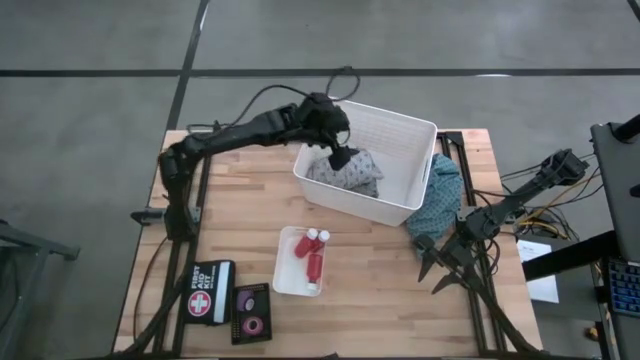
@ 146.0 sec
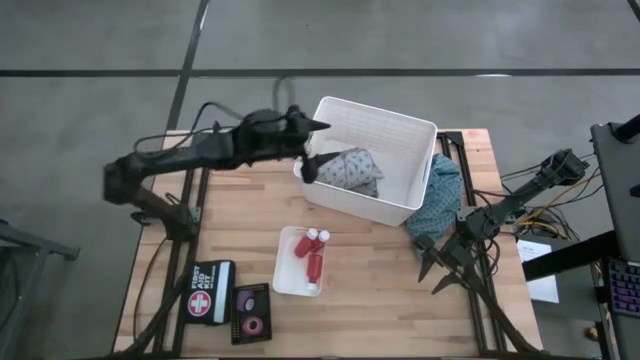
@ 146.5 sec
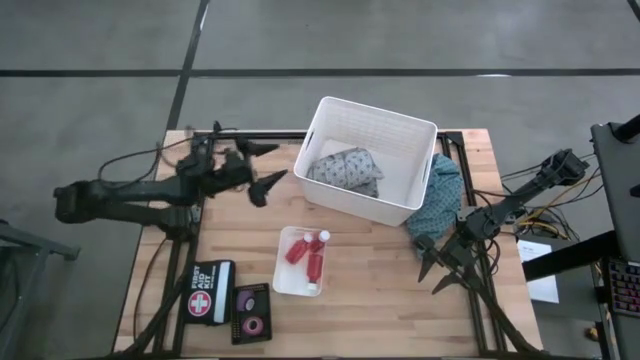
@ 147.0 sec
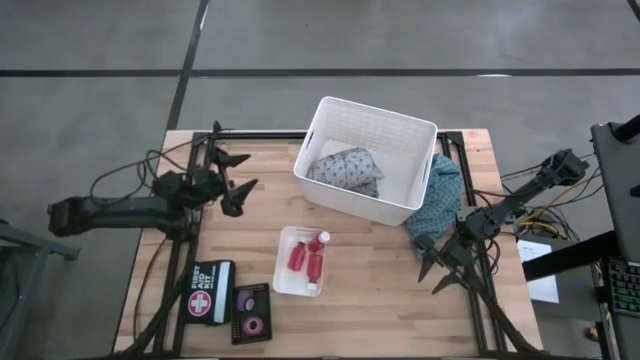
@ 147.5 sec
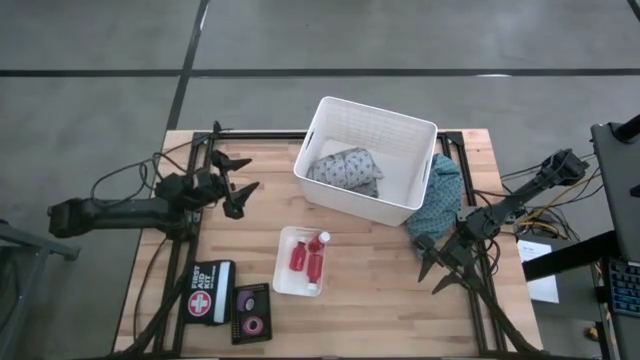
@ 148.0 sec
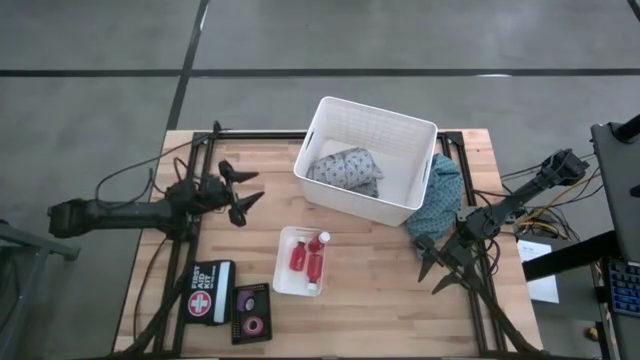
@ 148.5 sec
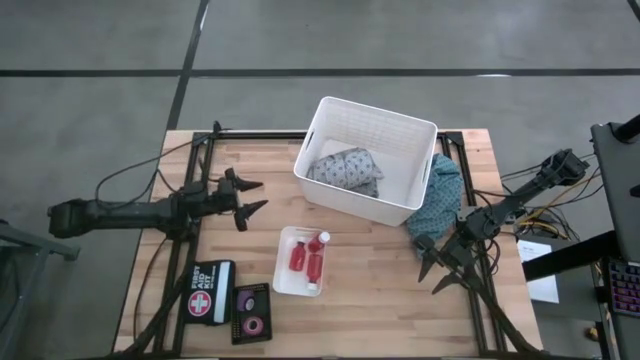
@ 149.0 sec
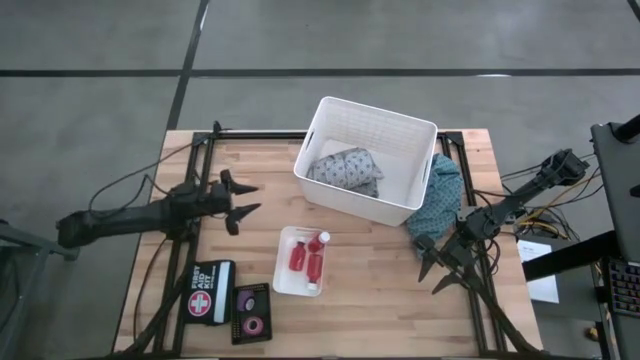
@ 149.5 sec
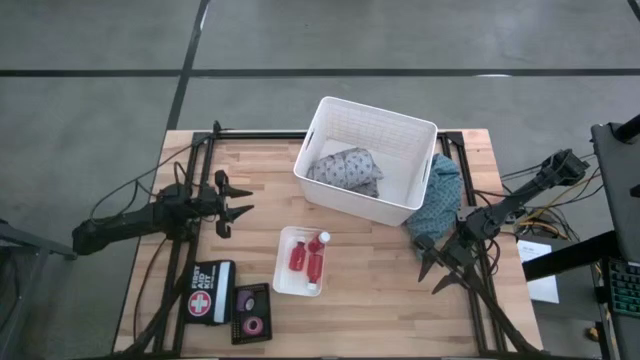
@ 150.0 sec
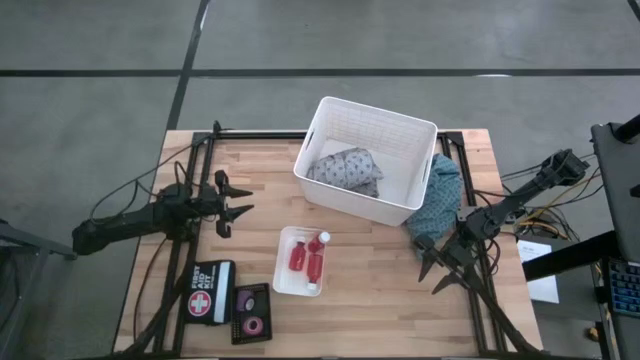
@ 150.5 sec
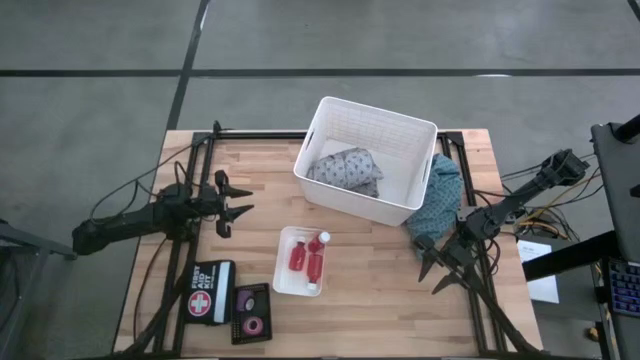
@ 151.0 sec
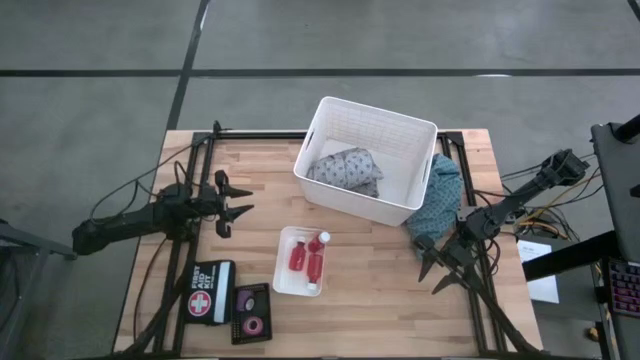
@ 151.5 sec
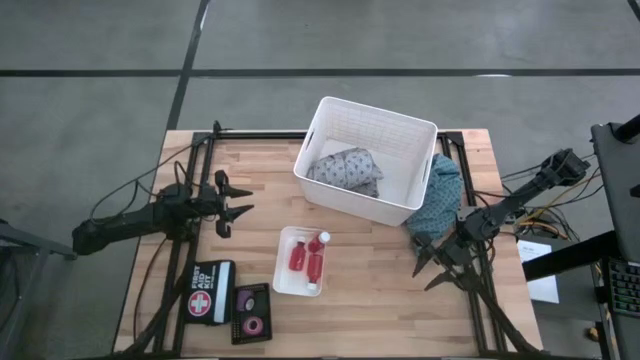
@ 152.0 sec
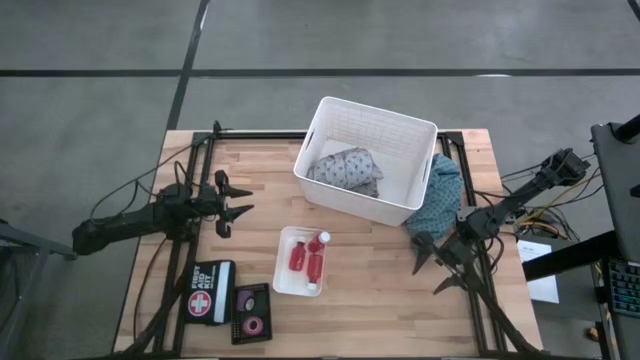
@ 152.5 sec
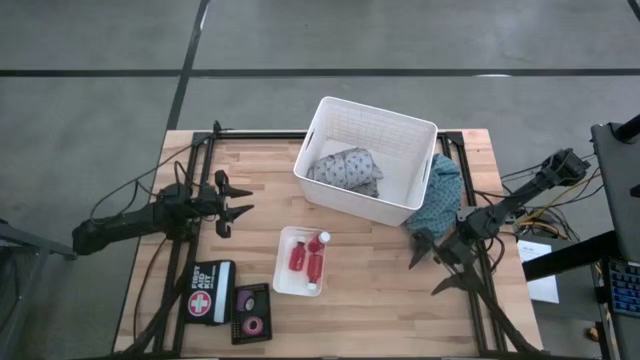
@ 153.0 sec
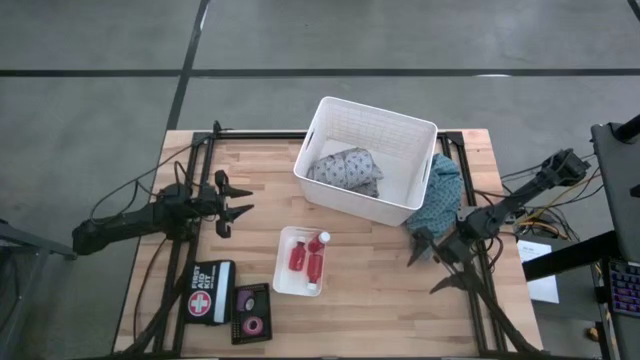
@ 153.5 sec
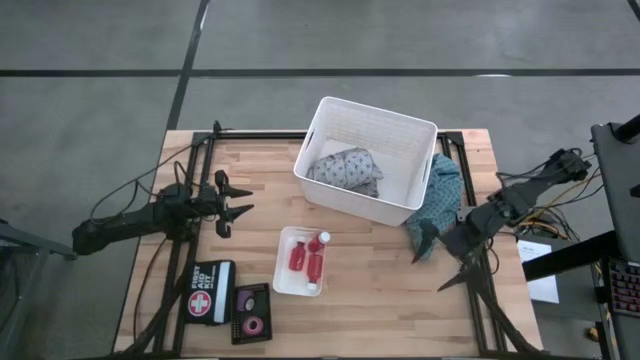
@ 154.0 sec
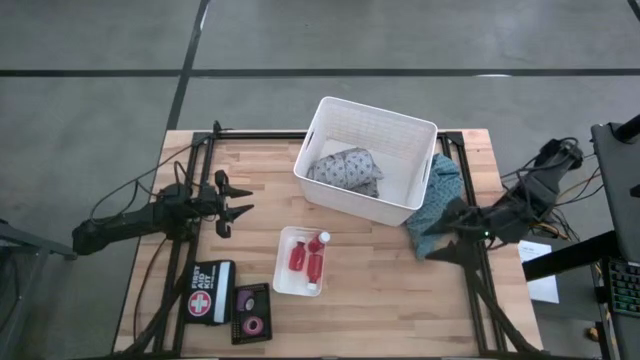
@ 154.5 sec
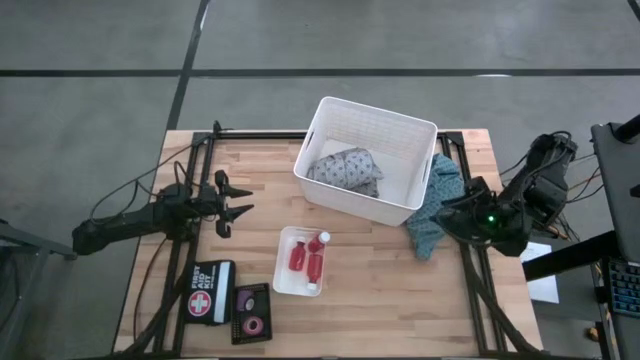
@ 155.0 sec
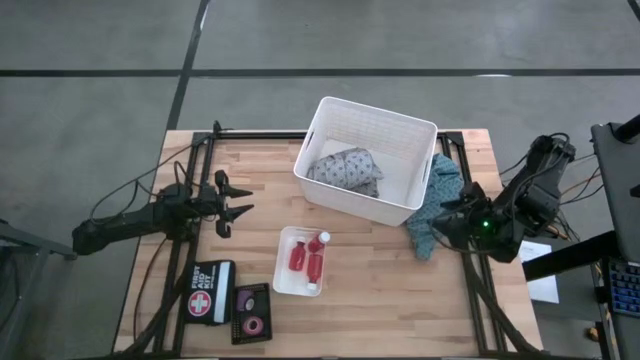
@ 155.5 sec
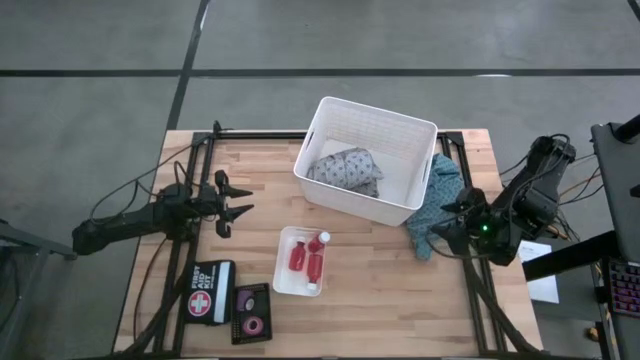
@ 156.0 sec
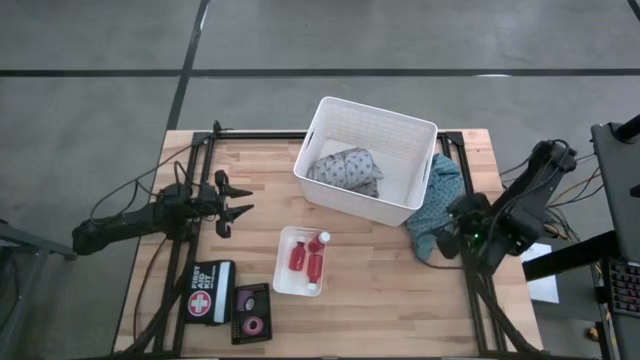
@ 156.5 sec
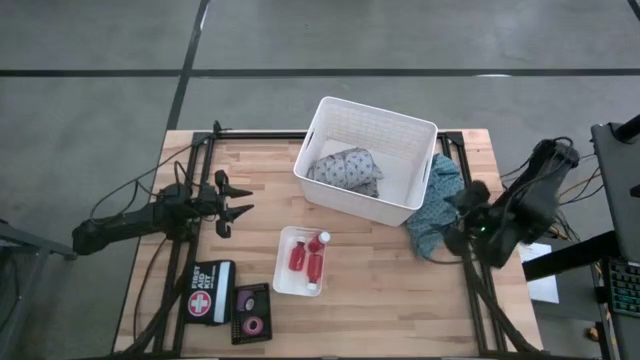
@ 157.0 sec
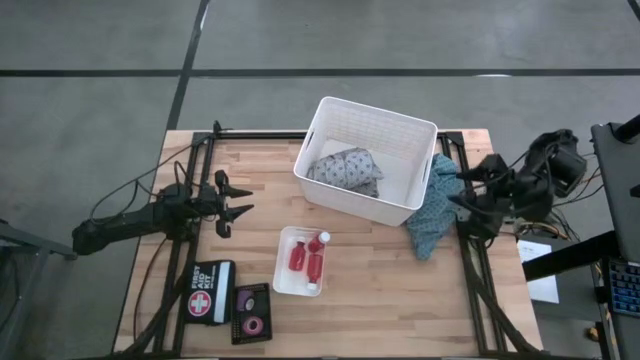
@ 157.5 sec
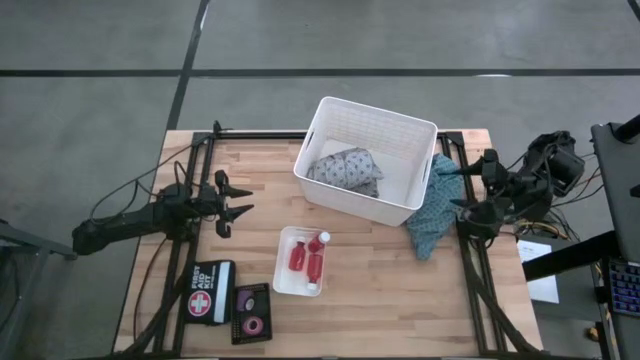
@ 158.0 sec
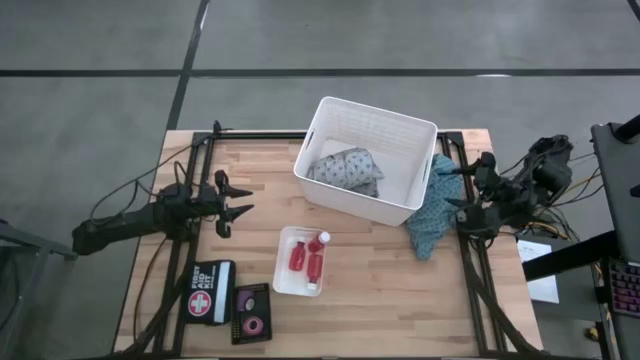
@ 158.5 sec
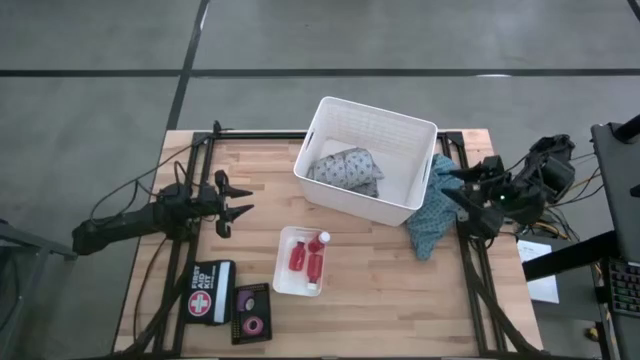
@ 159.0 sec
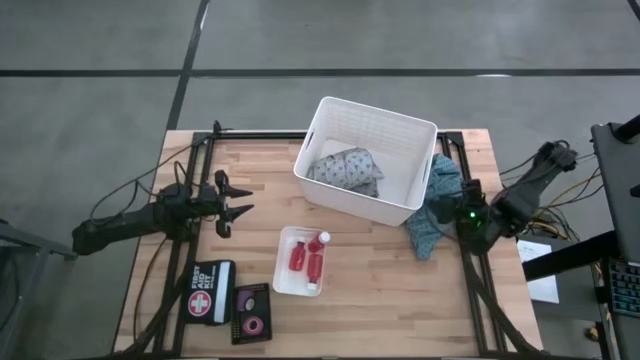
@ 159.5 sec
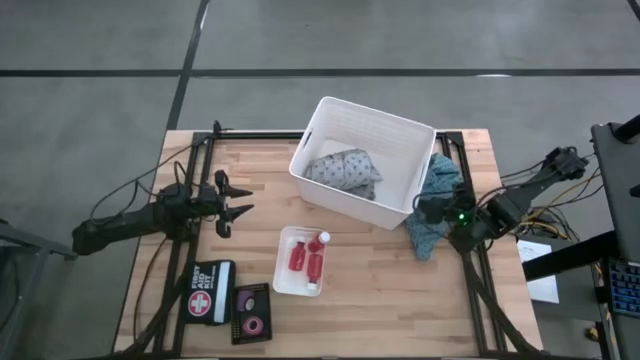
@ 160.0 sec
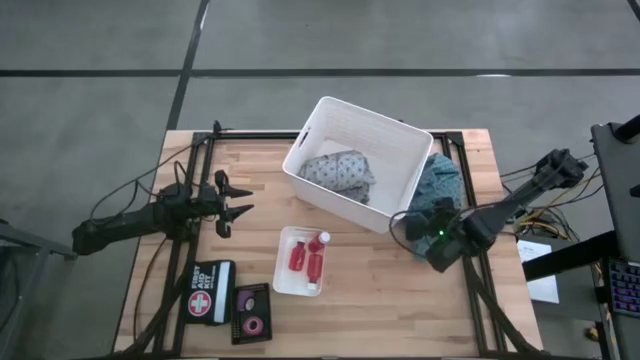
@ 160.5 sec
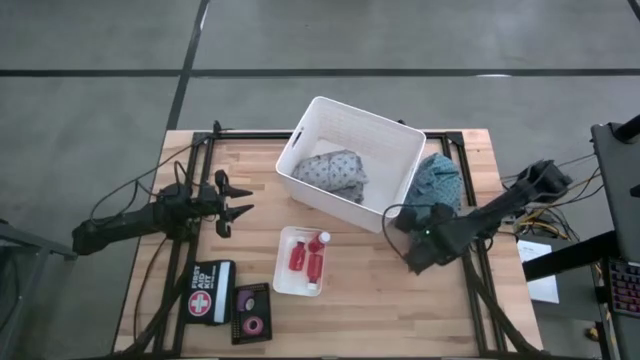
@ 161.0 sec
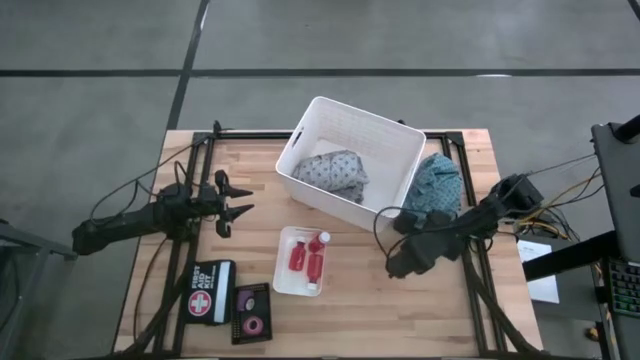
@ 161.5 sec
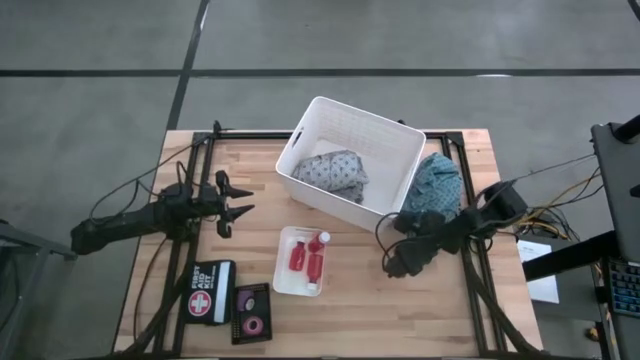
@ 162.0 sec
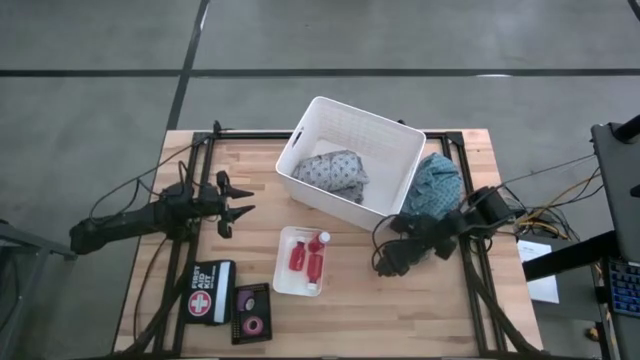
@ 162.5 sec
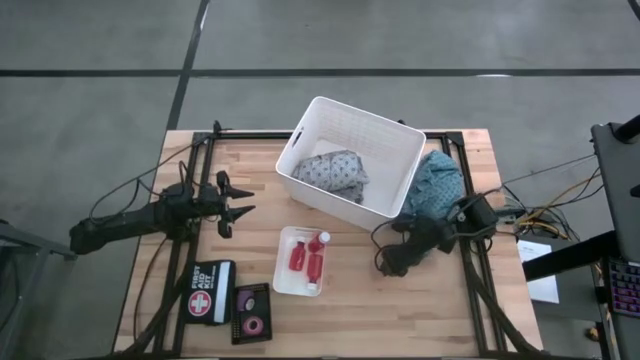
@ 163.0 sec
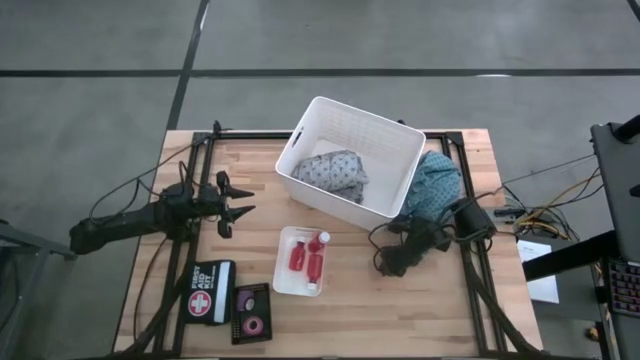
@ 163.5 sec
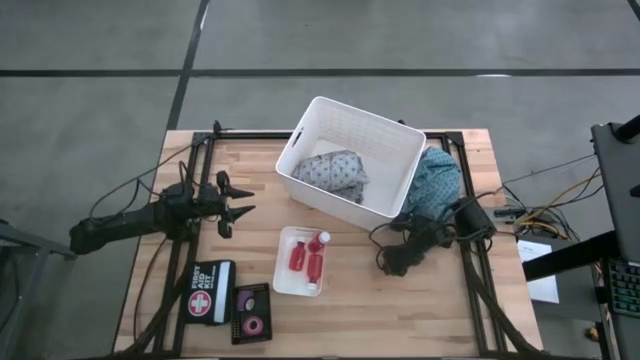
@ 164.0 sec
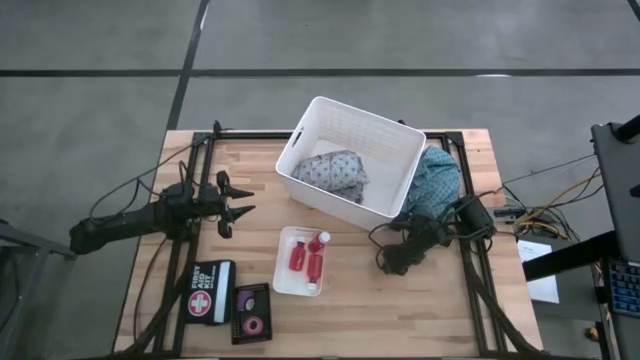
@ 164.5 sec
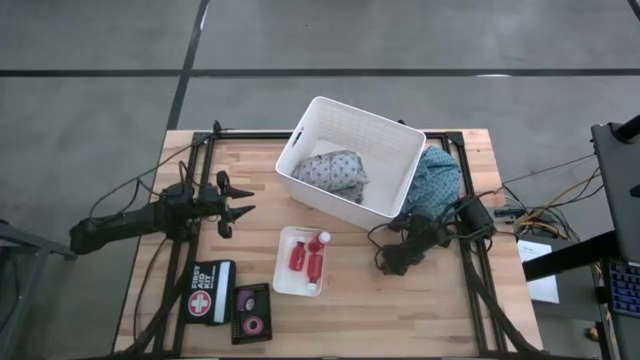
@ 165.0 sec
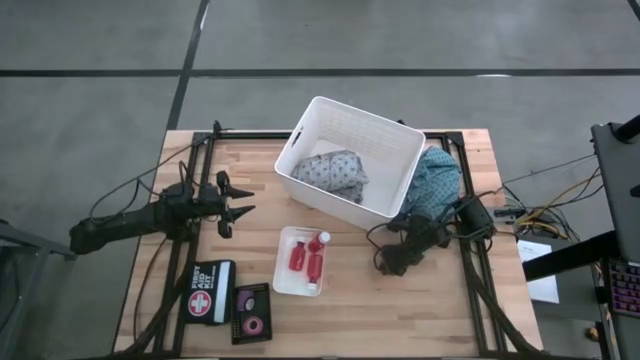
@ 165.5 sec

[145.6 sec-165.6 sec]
Task: Pick & Place Medicine items
Put the blue patient gown into the big white bin

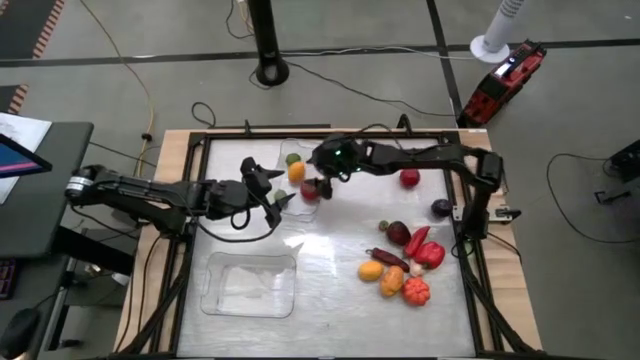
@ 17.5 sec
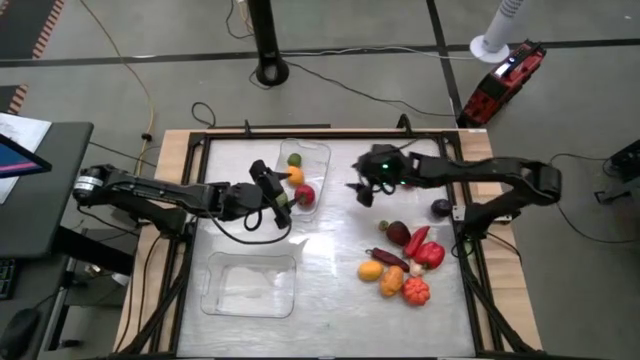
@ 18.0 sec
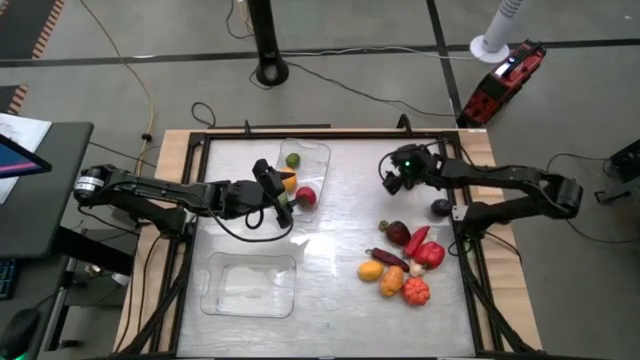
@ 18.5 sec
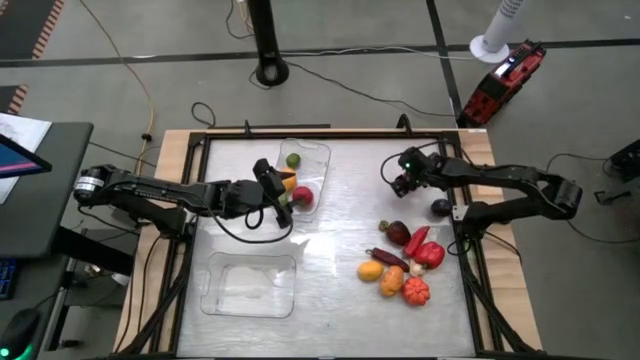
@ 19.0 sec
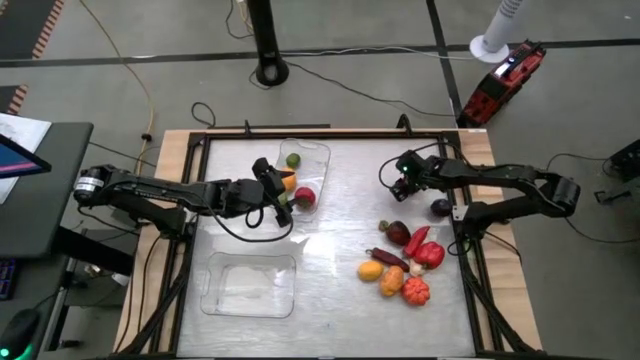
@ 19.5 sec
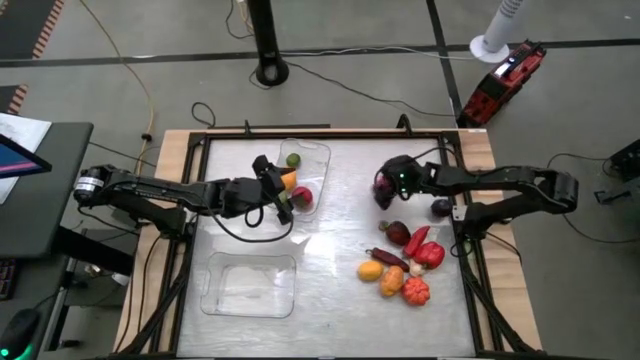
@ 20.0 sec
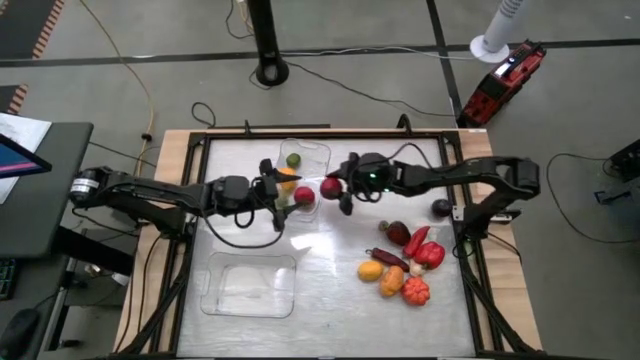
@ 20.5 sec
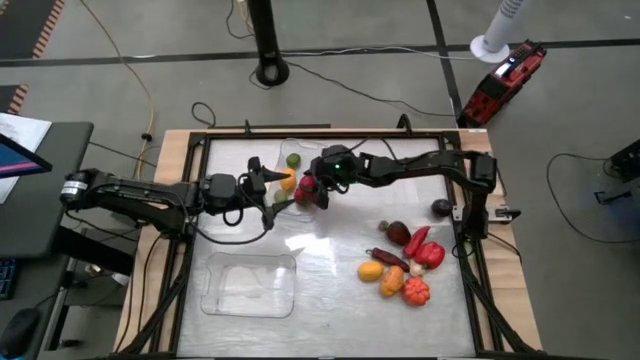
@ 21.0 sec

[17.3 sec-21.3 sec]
Task: Sort produce into baskets
Put the tomato into the top transparent bin
